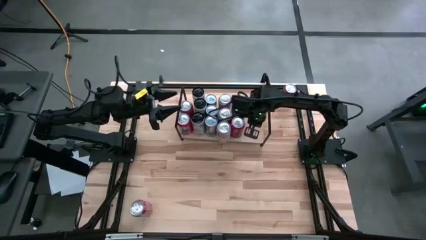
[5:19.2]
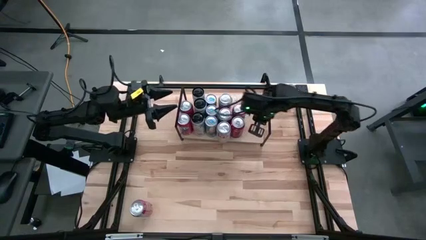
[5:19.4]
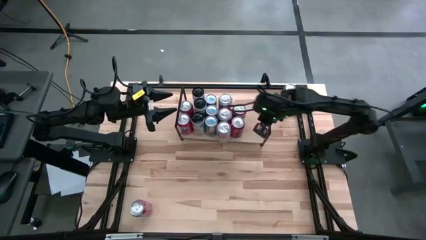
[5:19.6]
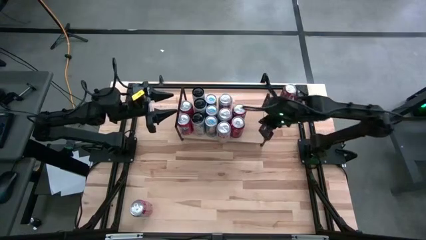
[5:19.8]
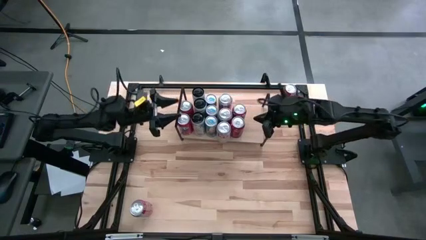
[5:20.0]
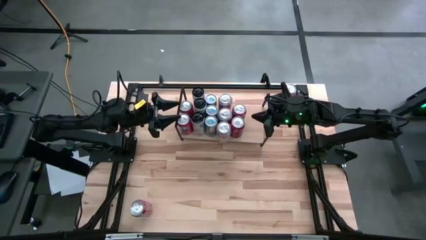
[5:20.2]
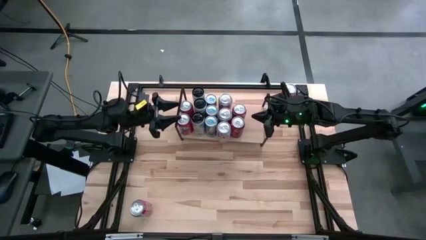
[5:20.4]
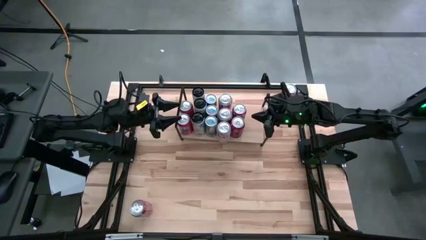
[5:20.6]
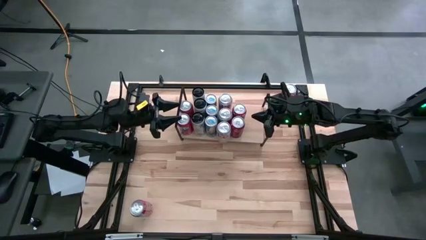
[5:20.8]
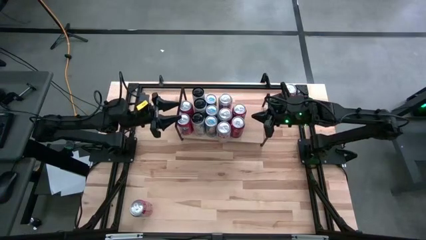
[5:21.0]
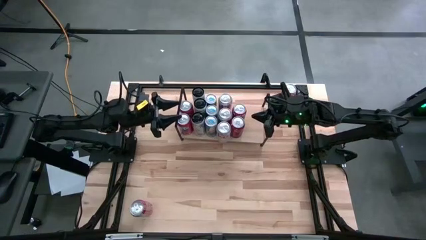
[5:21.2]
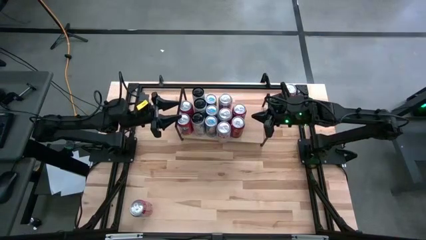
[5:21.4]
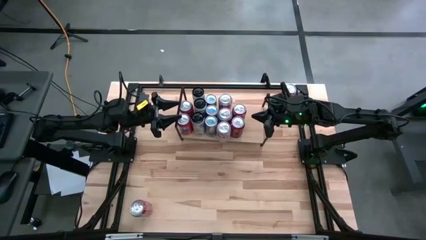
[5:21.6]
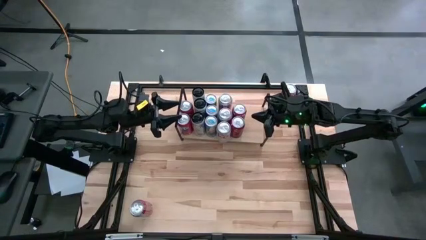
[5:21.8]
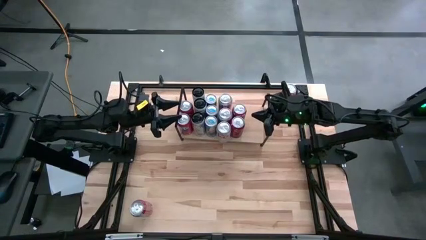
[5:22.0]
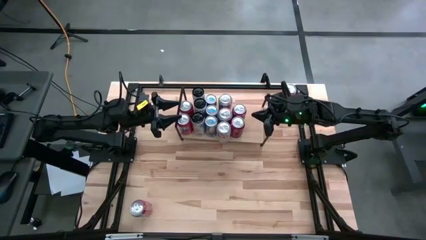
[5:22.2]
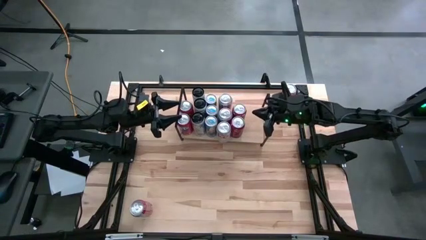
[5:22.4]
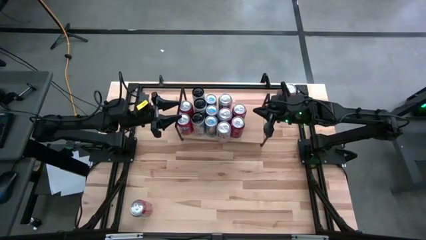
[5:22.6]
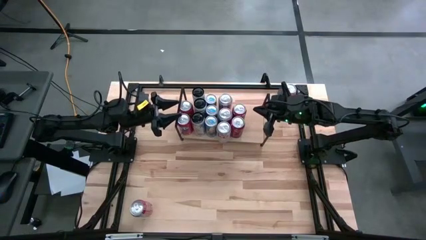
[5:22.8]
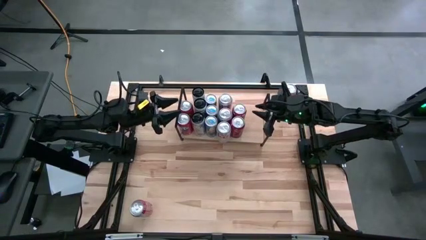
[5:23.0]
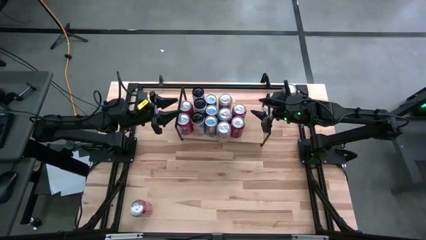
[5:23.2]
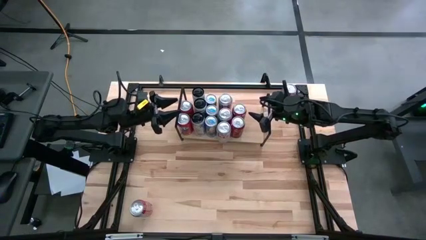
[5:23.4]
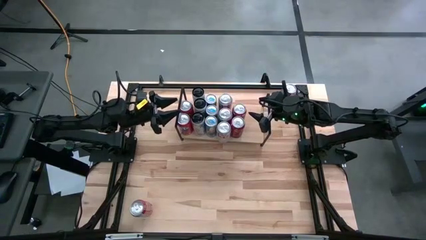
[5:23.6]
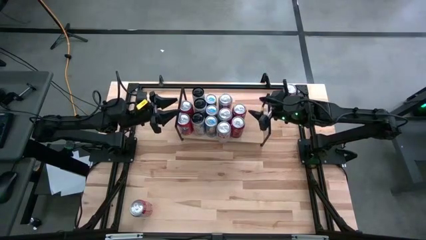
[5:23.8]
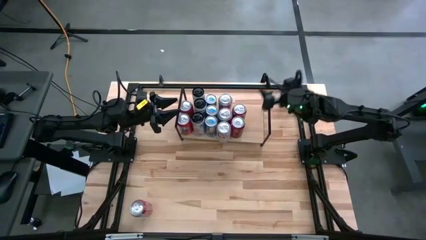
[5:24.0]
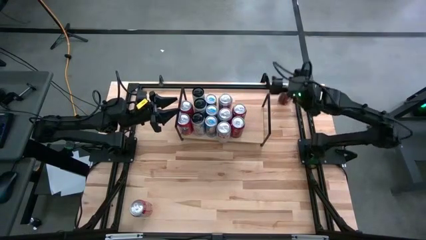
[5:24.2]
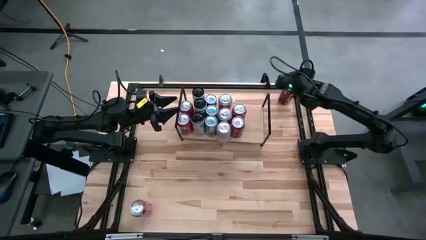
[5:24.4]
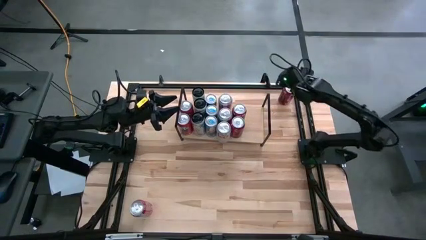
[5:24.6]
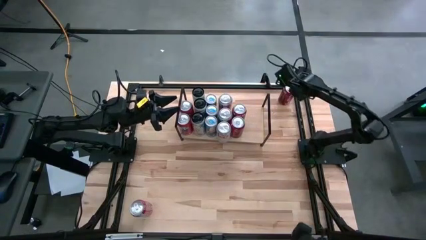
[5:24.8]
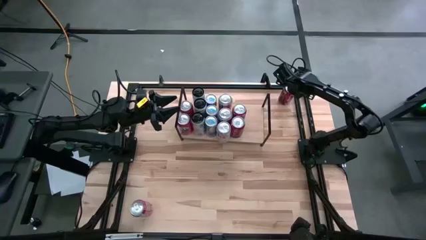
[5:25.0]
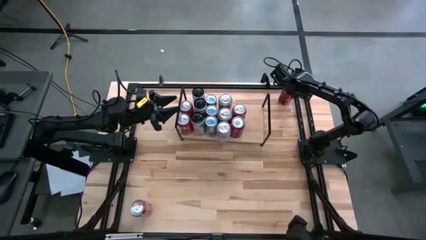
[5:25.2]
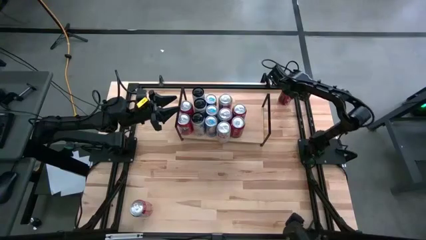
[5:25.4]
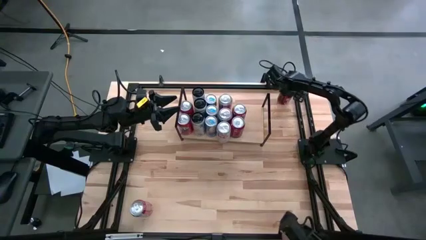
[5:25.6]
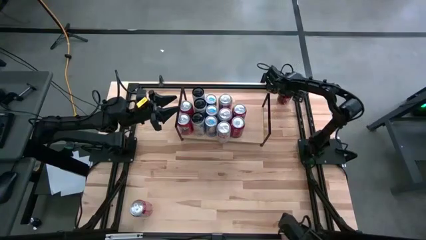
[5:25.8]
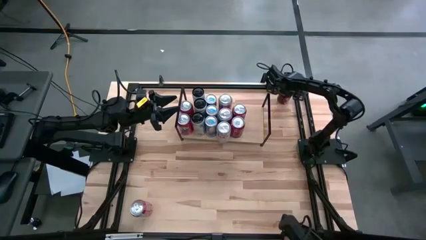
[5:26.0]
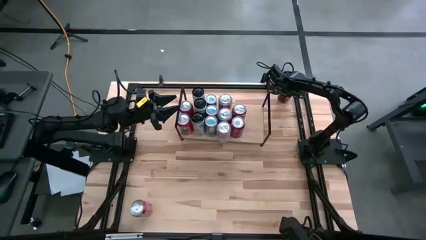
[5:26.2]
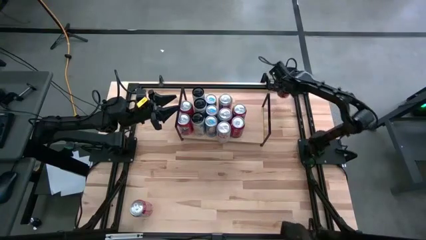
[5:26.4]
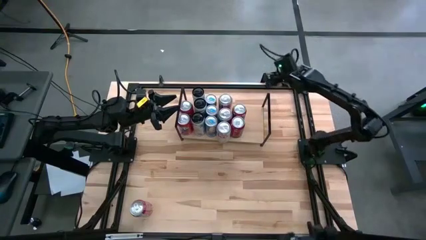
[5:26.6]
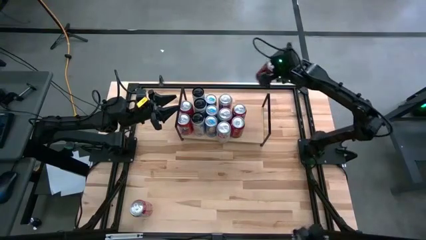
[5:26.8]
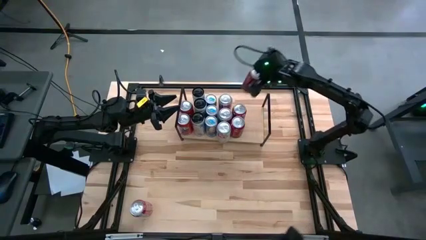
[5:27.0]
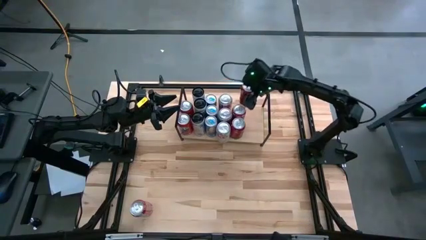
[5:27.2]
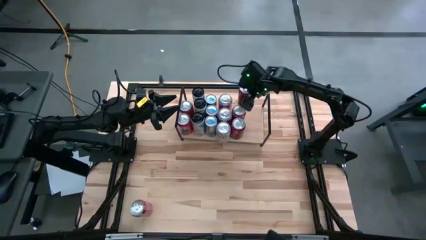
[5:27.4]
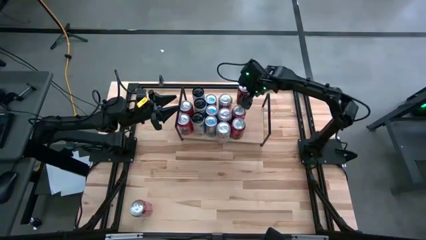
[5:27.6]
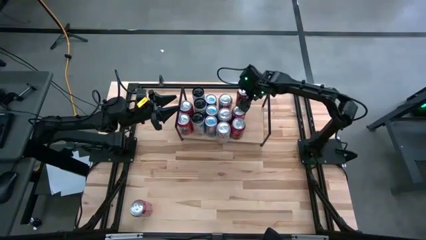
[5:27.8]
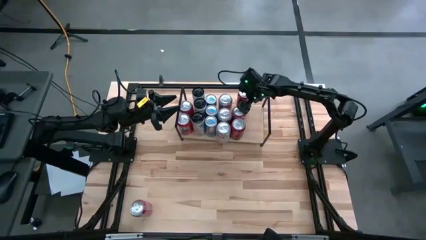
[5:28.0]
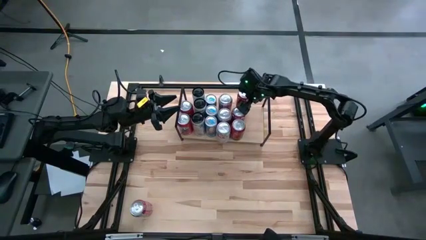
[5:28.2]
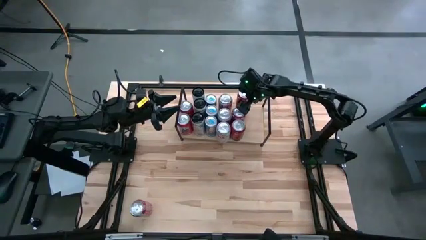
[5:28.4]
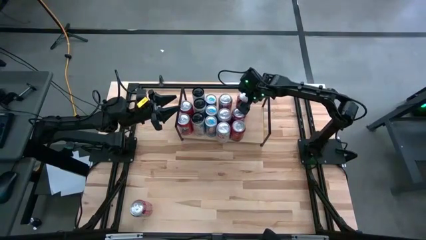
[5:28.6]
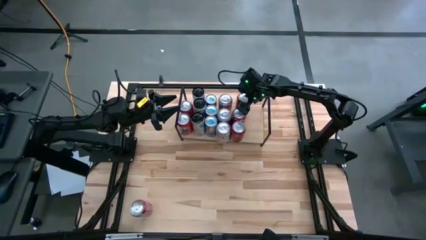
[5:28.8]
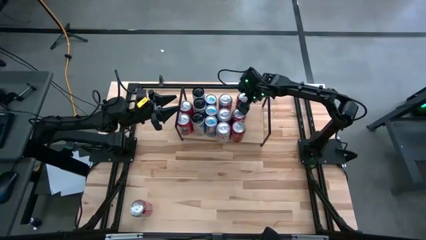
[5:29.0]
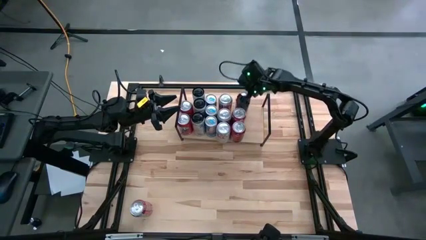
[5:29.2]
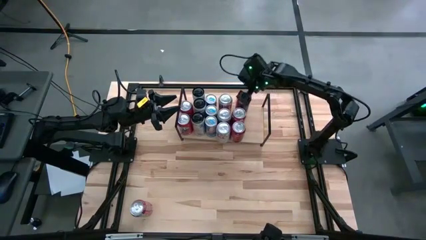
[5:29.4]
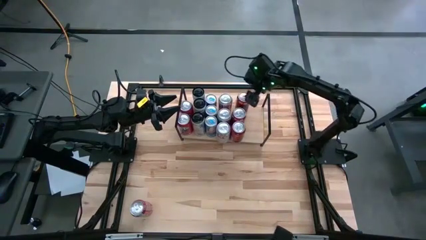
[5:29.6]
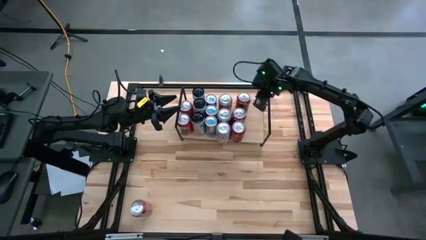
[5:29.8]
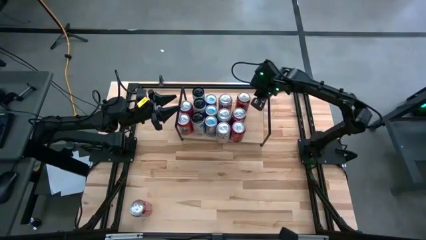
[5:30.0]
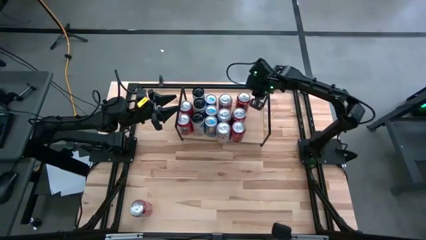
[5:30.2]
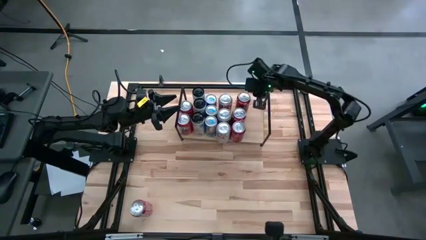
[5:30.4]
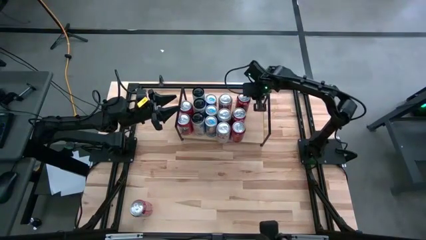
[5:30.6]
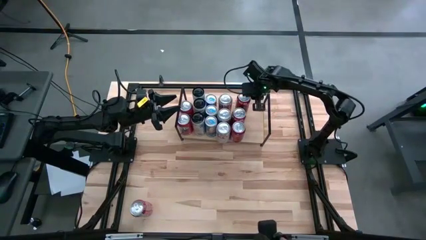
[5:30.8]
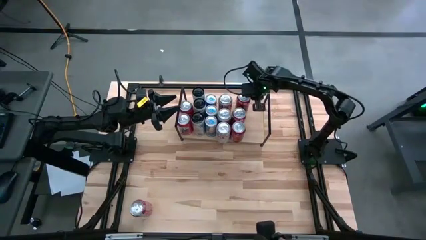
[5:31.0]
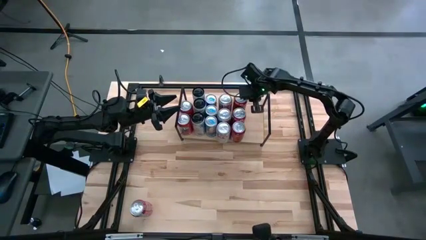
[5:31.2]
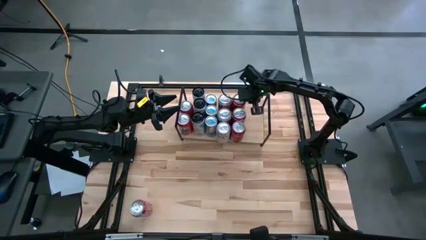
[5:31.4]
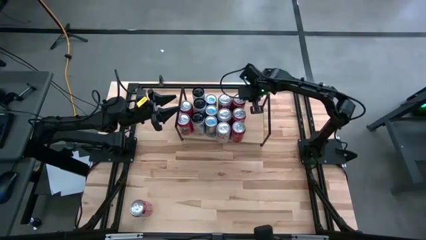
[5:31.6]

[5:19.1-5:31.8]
Task: Place canned beverage on shelf
Put the top red-white soda can on the shelf aligned with the other red-white soda can

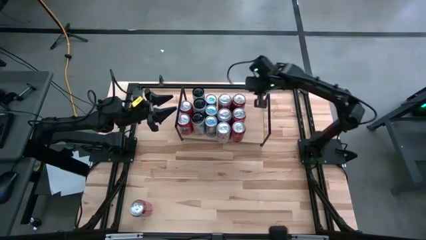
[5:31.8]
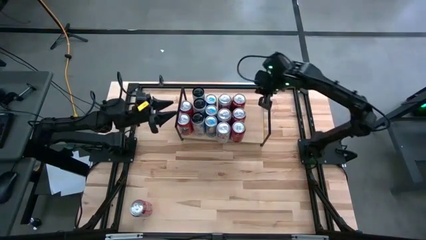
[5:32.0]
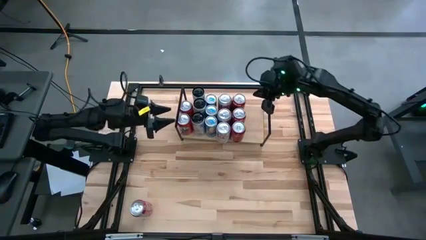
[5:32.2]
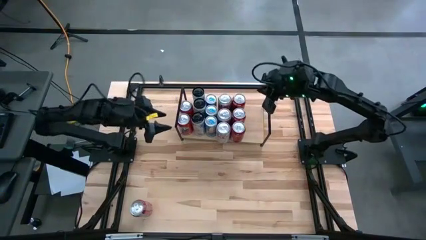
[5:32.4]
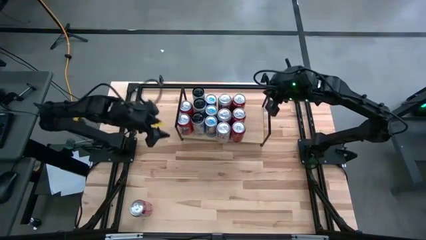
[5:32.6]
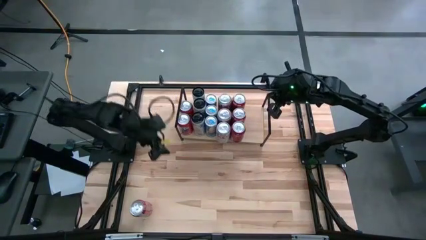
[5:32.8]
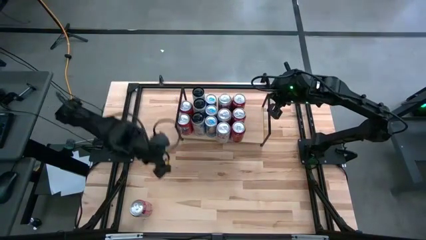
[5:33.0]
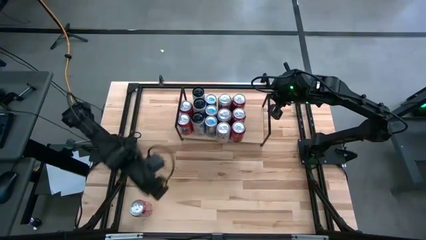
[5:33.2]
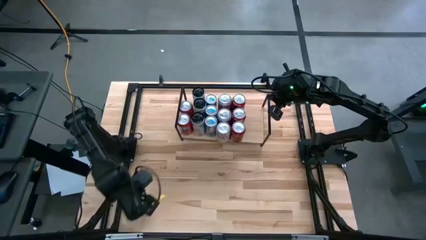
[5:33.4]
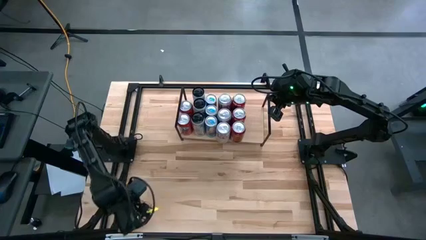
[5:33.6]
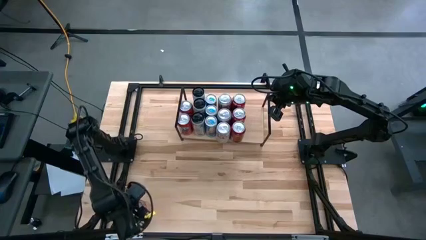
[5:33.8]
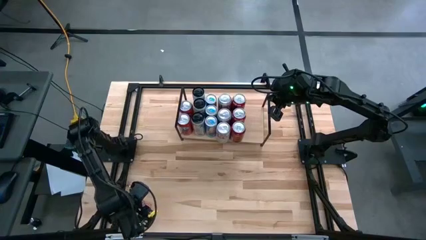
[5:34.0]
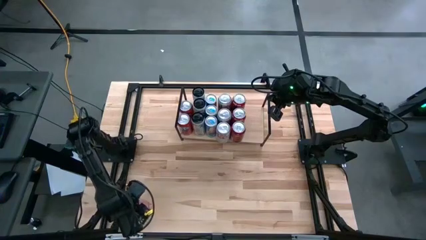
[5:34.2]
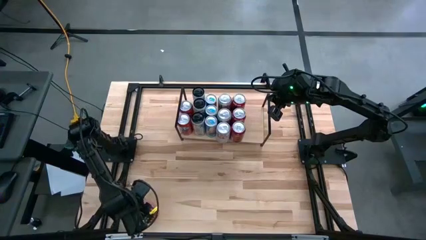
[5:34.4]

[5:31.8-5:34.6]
Put the red-white soda can on the shelf
